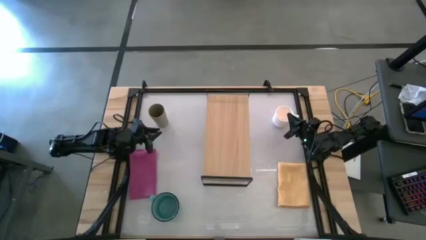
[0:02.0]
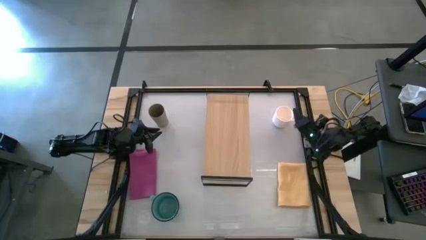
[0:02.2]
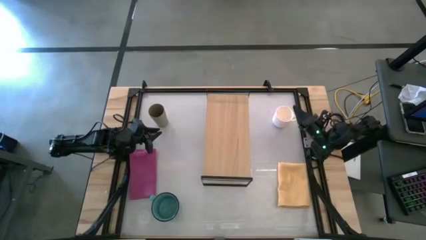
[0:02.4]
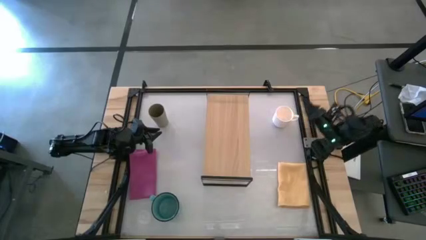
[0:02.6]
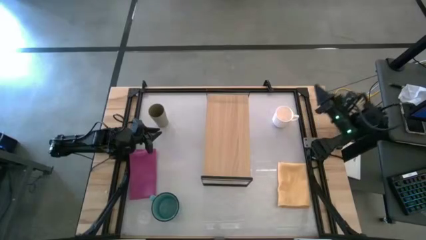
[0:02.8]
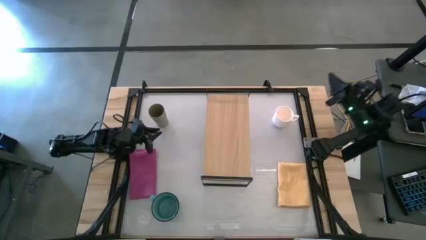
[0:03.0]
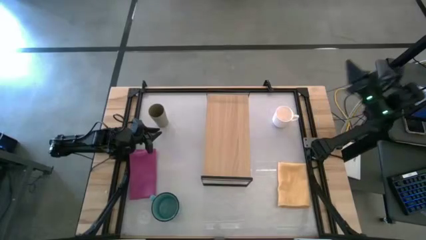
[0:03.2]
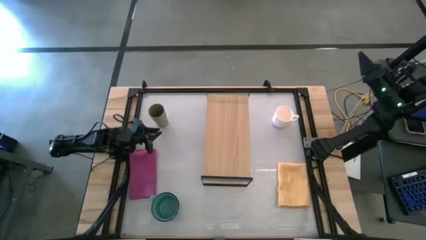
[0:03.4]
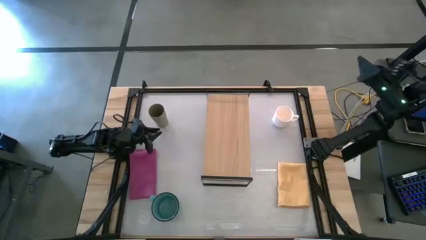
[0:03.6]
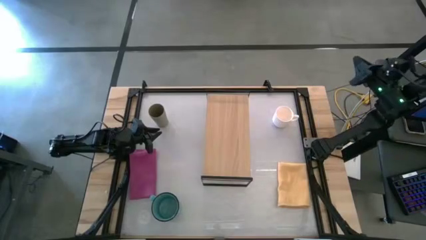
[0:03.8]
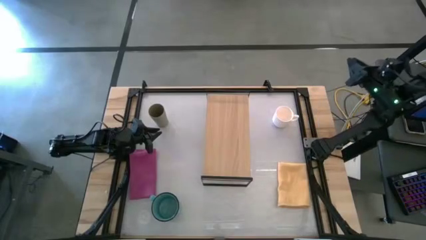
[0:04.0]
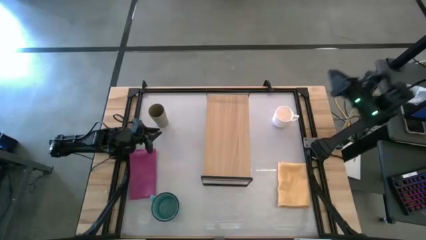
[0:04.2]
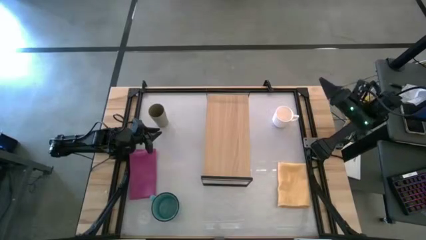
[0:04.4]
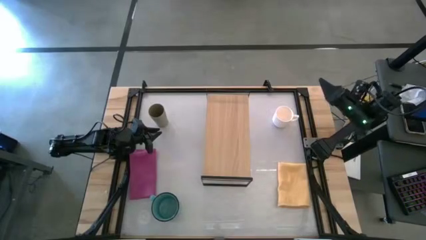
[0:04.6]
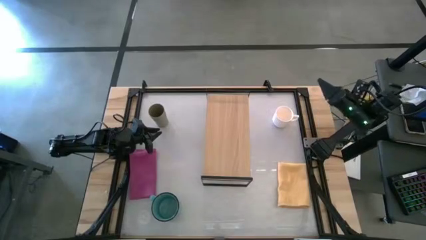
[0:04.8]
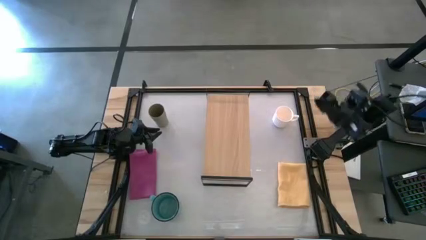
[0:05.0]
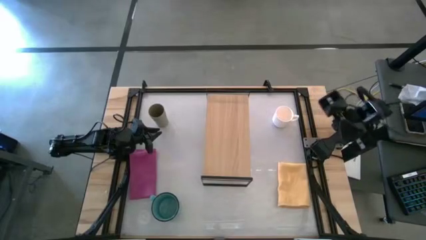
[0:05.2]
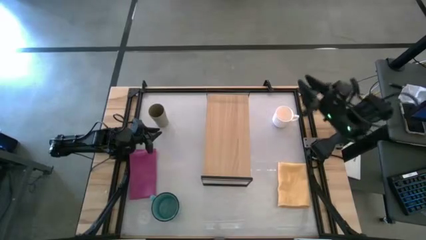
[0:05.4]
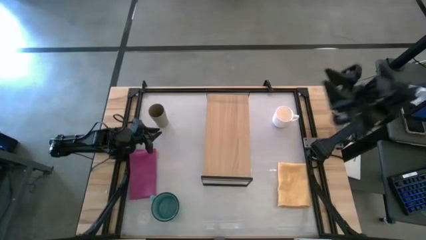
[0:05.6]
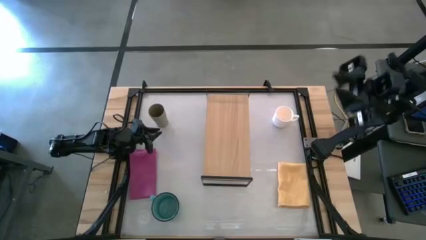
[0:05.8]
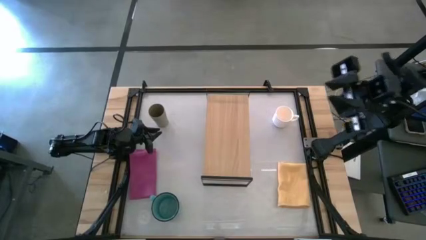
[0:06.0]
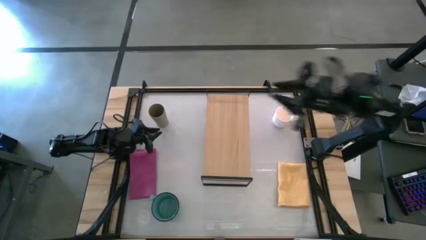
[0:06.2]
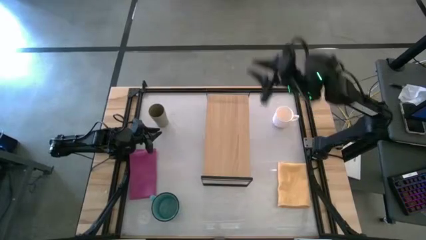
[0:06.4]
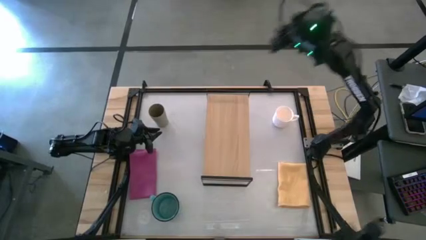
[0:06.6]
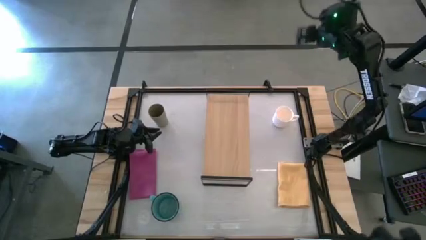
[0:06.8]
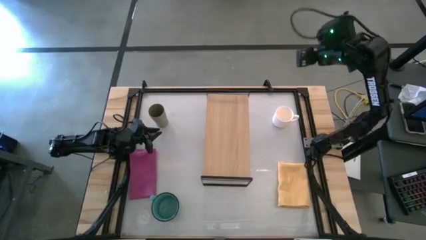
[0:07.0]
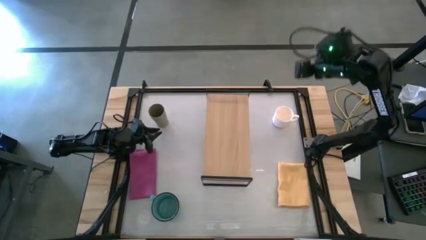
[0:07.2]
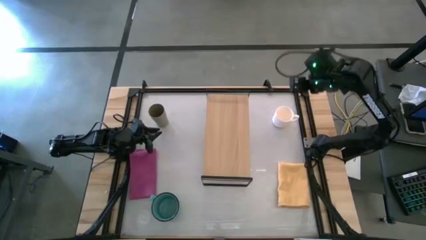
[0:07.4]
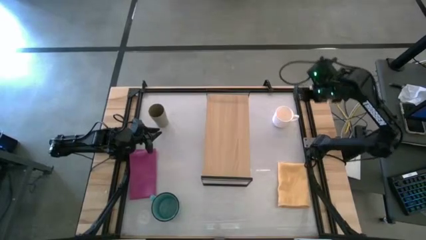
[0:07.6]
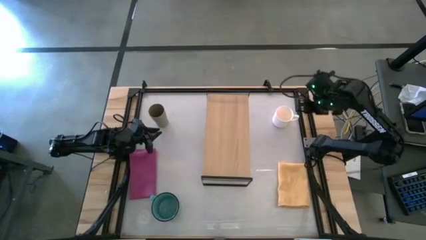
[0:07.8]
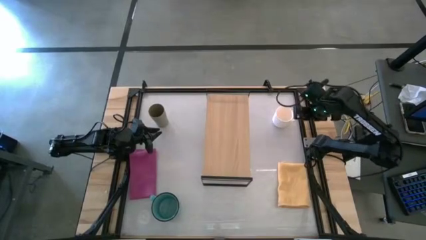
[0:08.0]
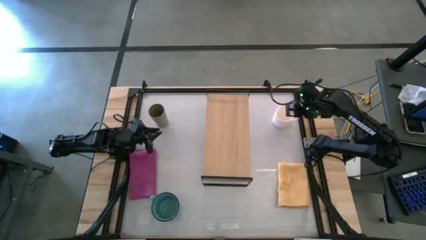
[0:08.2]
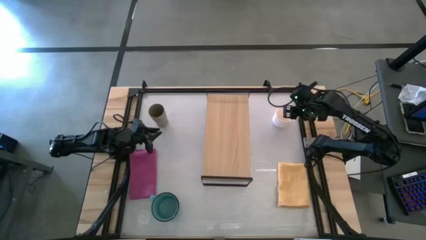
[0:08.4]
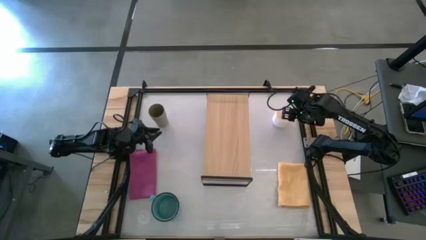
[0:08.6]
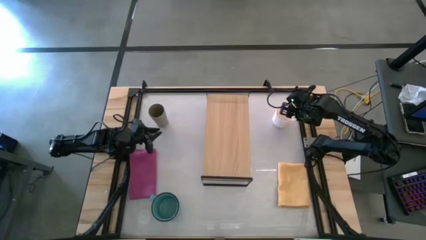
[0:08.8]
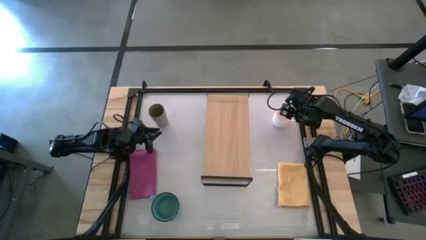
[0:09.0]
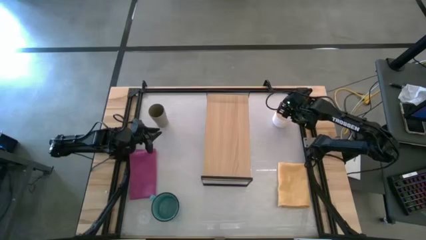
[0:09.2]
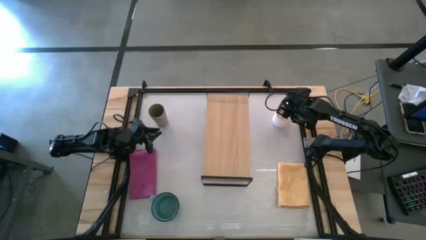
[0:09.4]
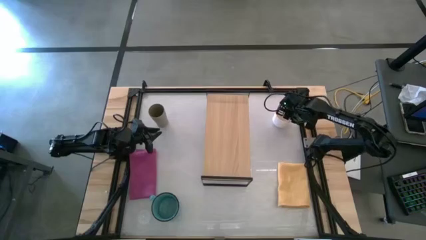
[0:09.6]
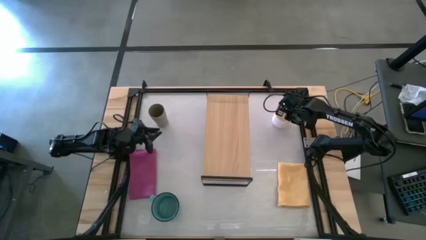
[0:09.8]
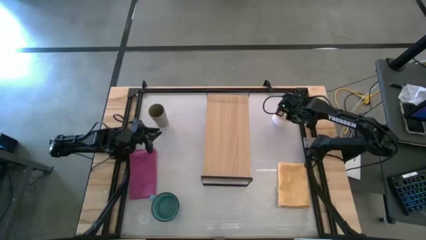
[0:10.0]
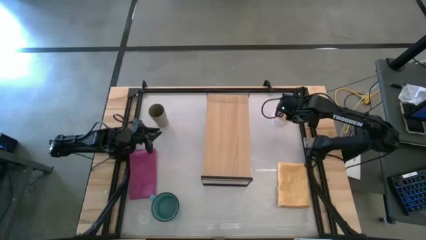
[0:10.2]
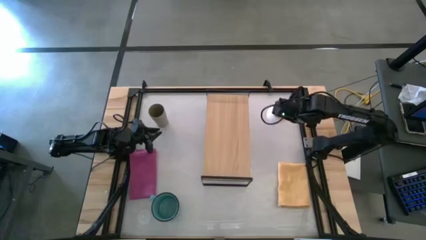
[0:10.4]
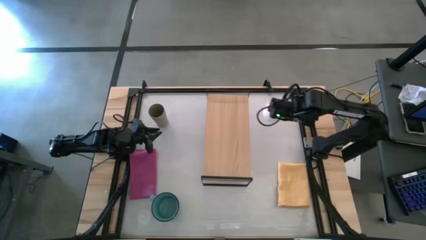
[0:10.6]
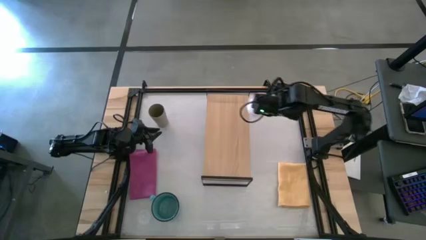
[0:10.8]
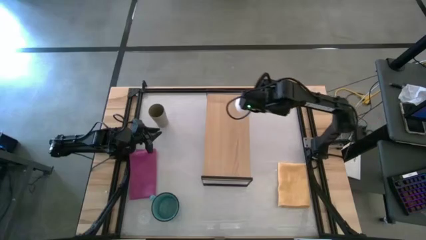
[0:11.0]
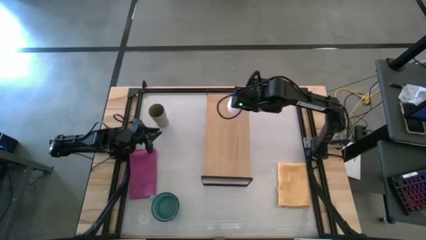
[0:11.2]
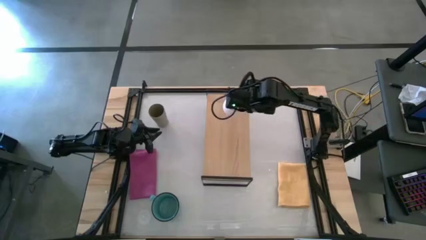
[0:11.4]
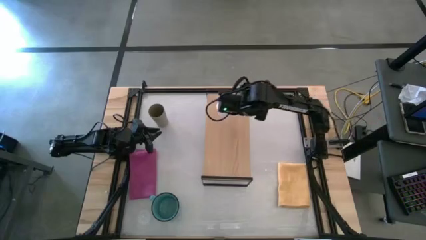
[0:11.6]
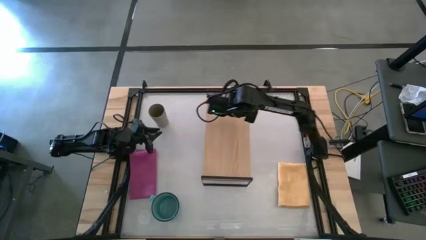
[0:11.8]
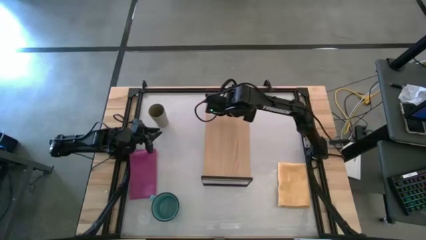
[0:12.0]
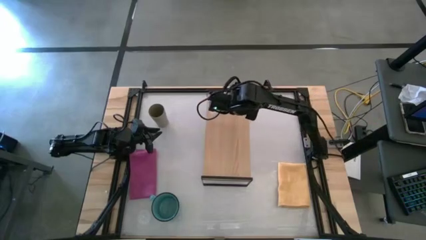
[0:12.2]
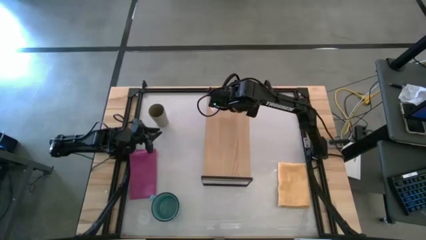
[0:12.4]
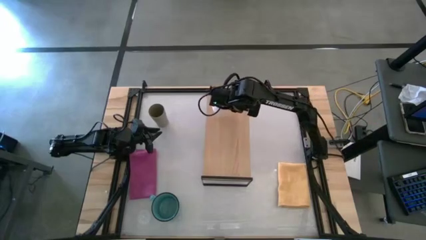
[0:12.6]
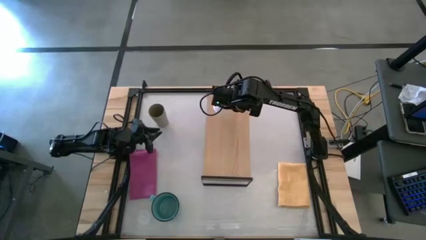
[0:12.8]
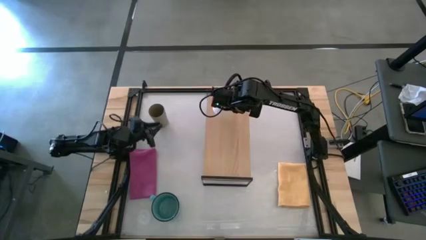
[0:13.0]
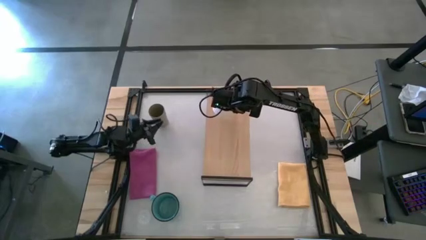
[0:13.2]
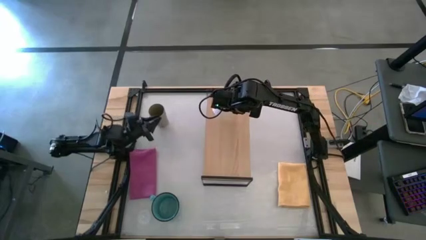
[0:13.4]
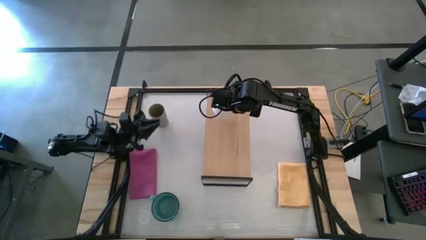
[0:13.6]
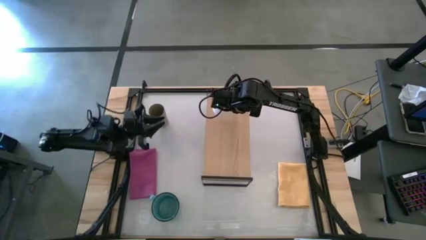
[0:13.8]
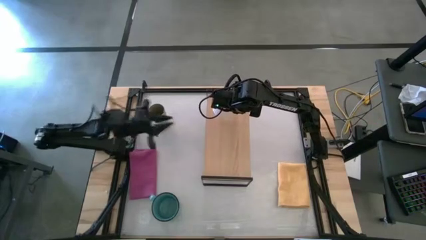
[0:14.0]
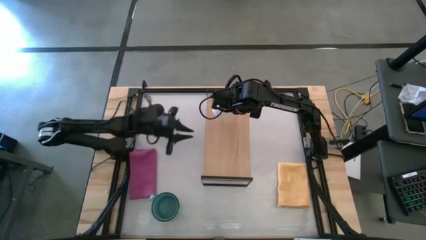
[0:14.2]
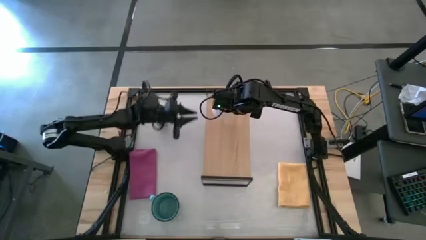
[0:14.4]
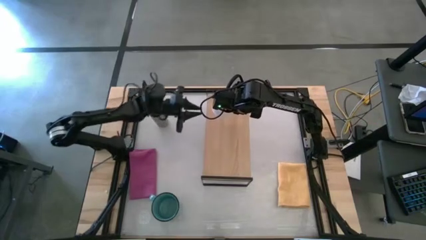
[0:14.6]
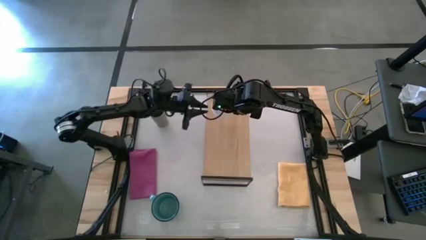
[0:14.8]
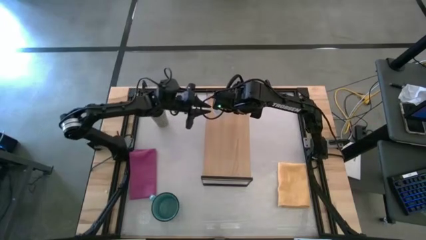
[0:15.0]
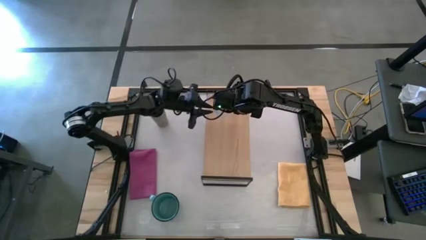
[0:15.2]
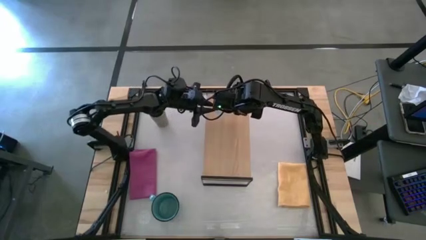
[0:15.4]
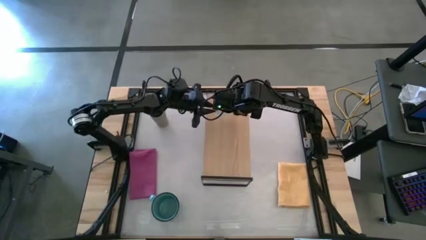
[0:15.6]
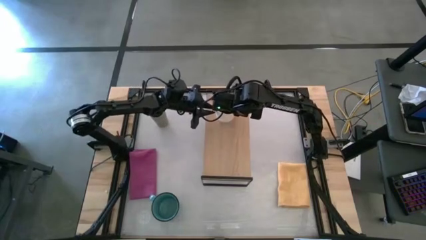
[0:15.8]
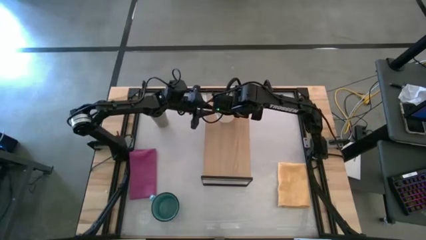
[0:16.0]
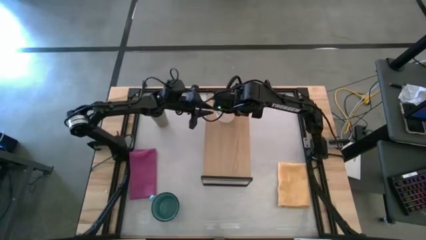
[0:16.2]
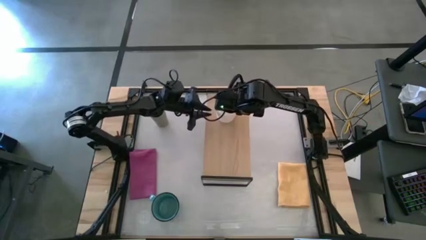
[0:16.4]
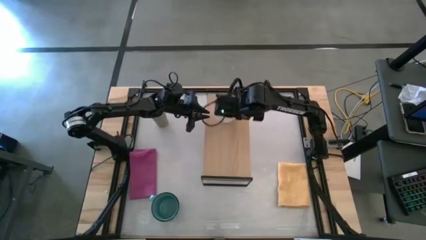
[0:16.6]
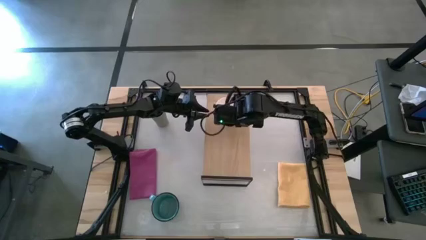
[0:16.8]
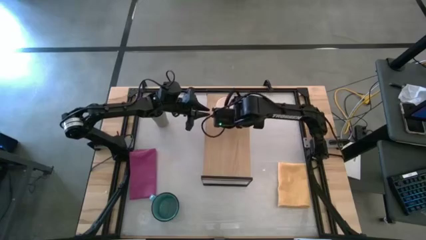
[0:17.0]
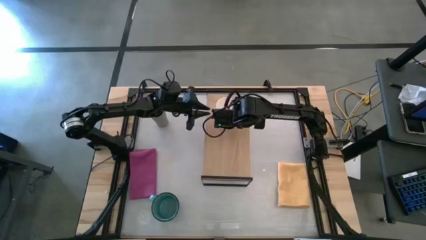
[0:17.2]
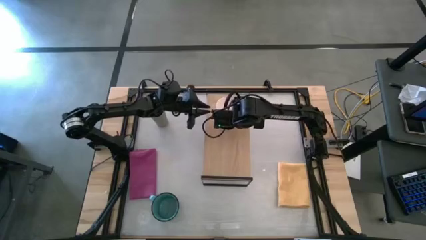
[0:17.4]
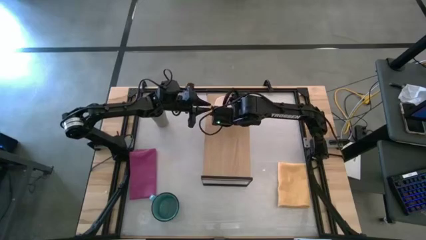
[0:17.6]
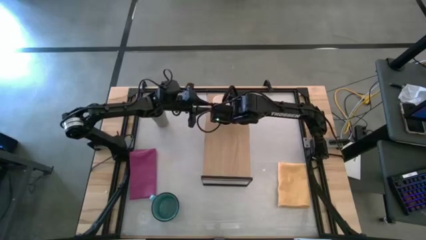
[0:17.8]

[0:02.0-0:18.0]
Task: Stack small to large cups/mugs on shelf
Put the white mug on the shelf
